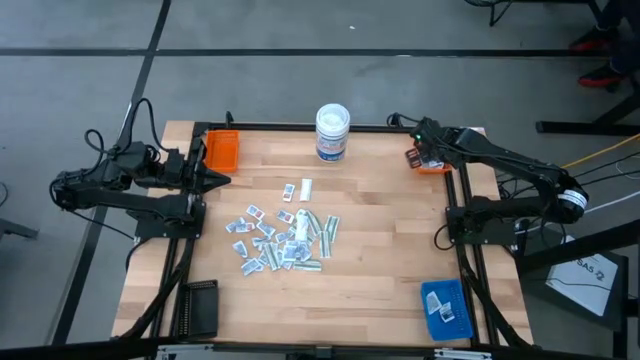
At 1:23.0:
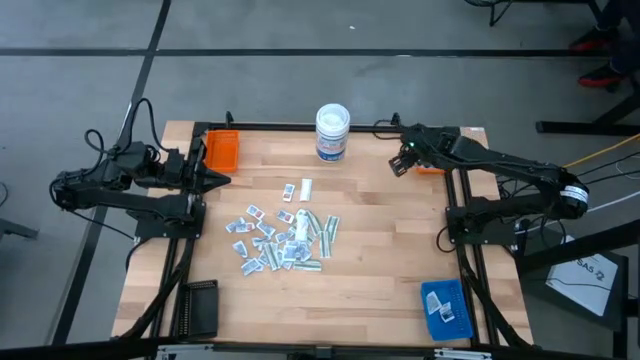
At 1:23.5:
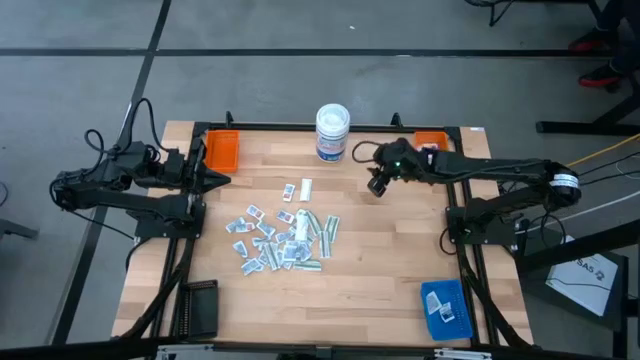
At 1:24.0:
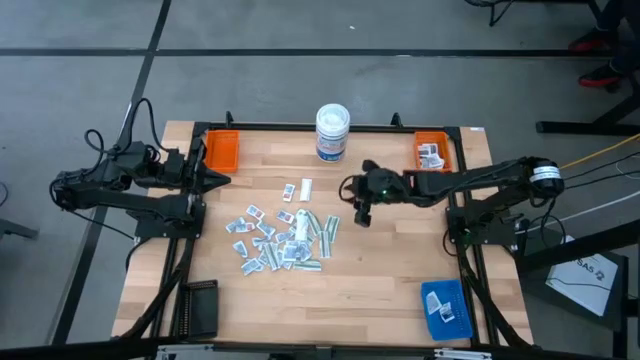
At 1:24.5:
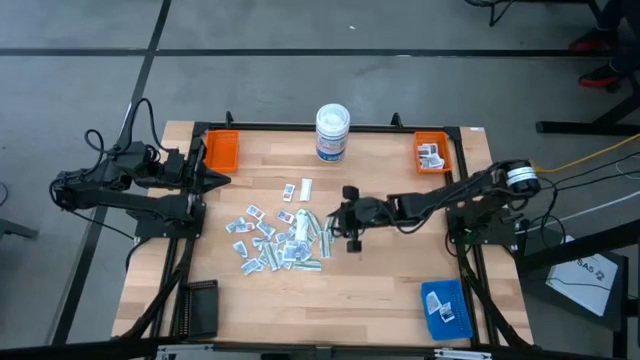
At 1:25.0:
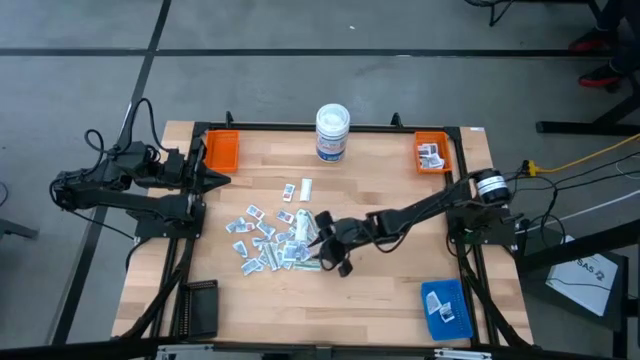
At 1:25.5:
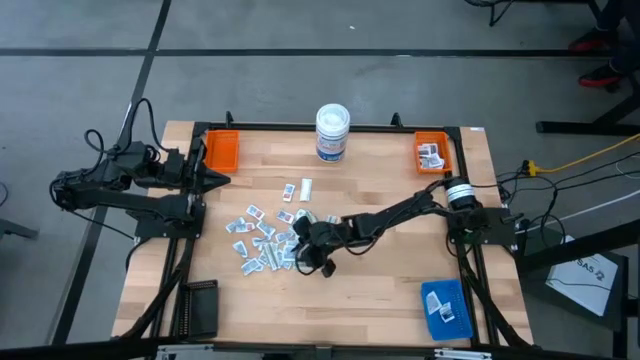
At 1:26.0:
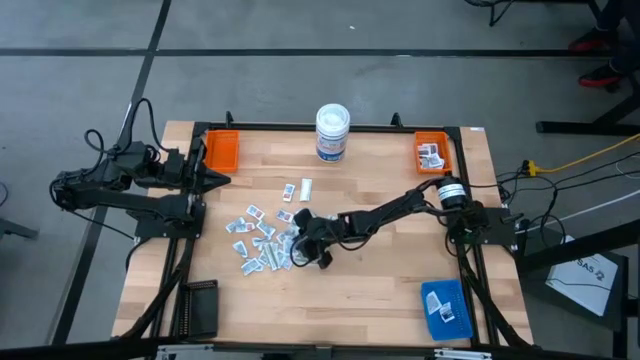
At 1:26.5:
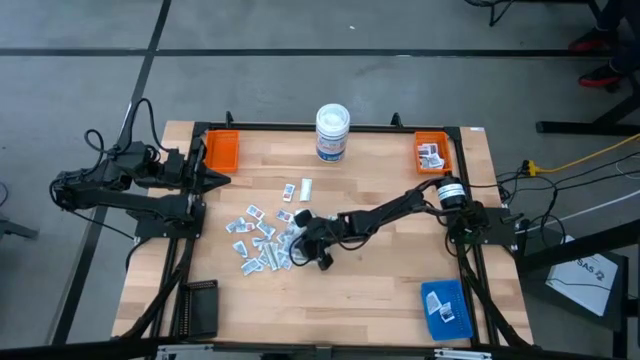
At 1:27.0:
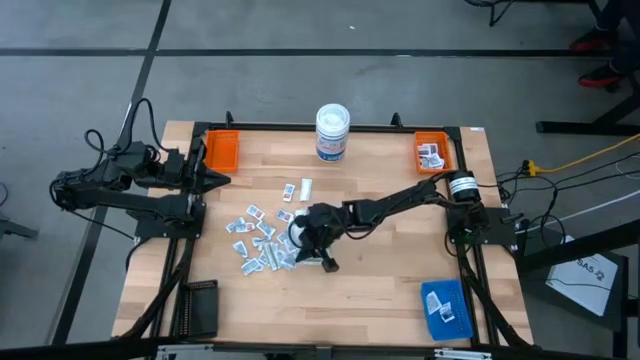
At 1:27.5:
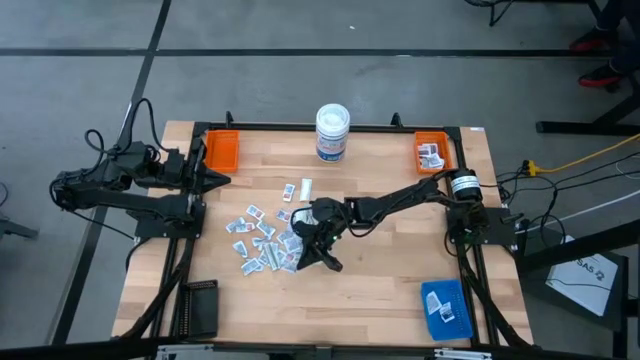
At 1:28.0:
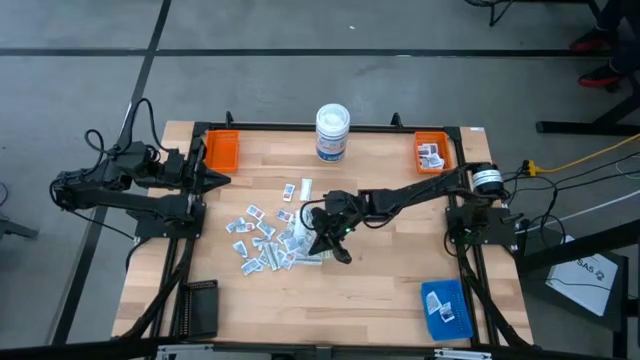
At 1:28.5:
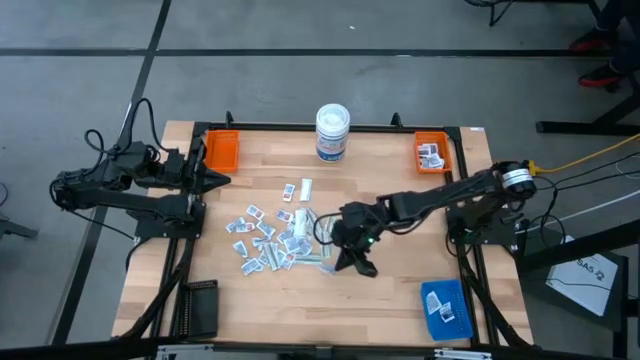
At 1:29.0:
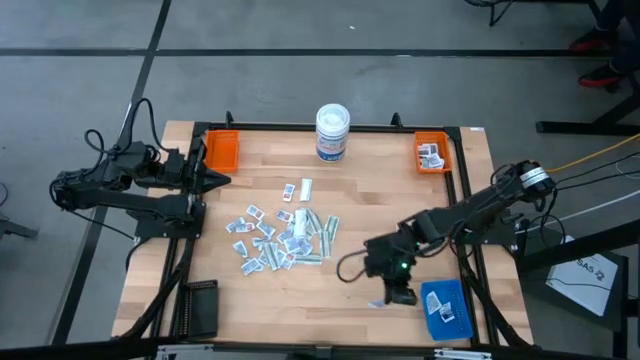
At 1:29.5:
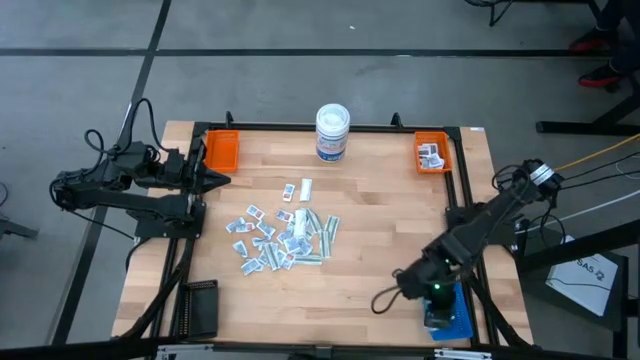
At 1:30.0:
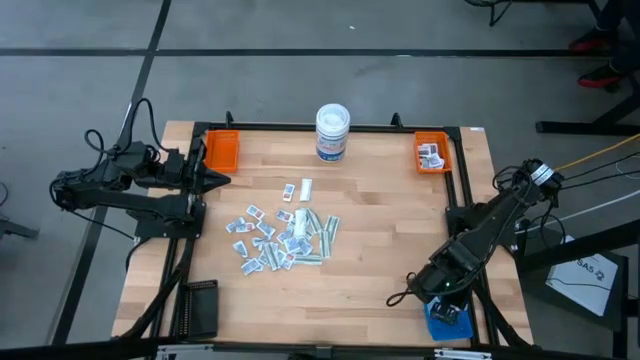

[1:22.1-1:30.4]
Task: Pick & Place First Aid Supplies
Put the blue alcohol pad into the blue bin

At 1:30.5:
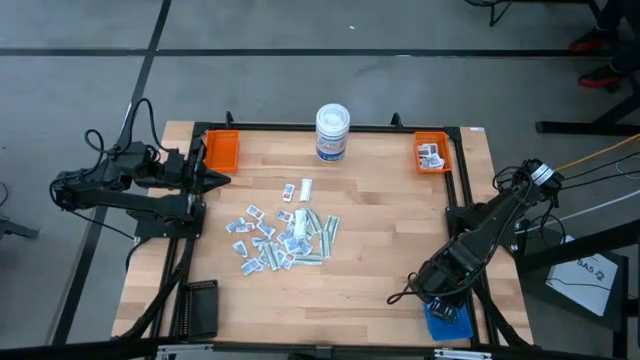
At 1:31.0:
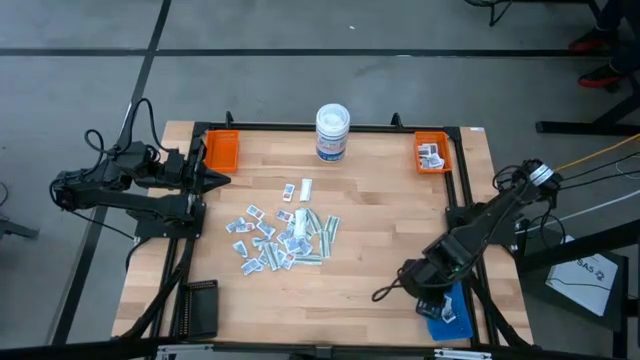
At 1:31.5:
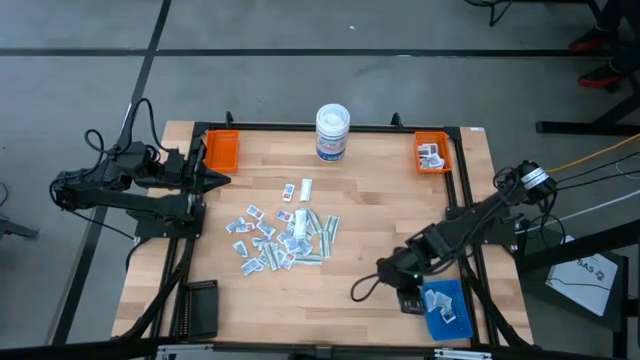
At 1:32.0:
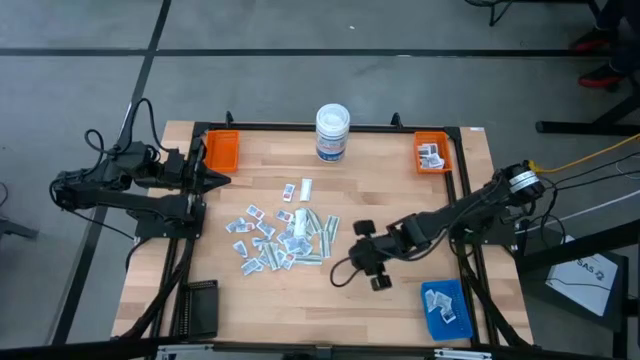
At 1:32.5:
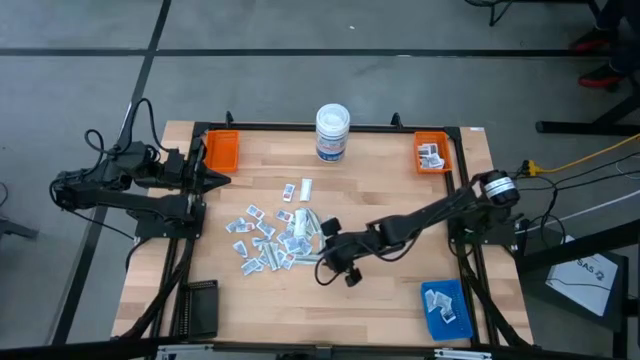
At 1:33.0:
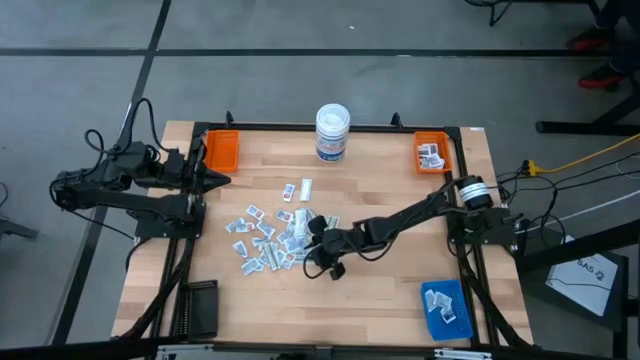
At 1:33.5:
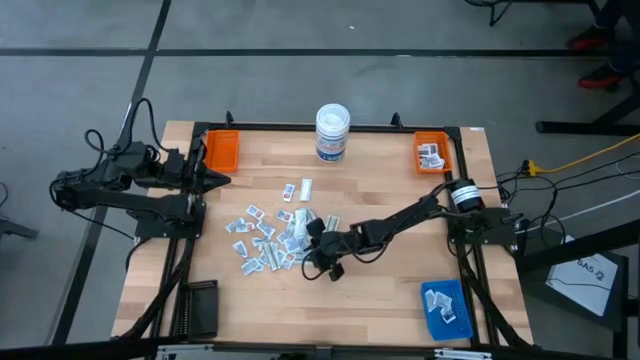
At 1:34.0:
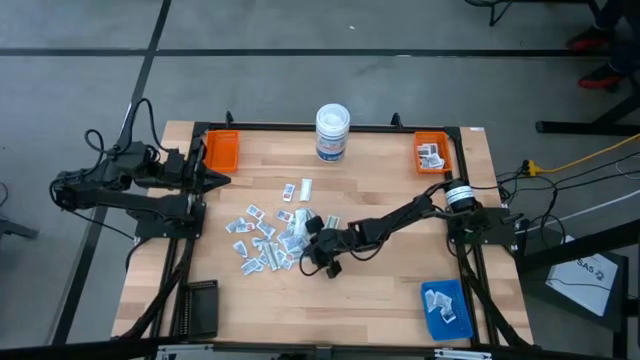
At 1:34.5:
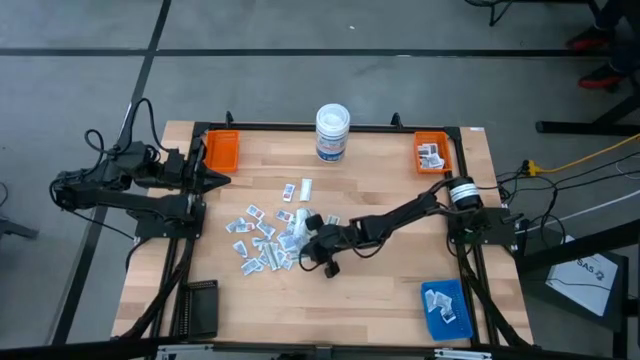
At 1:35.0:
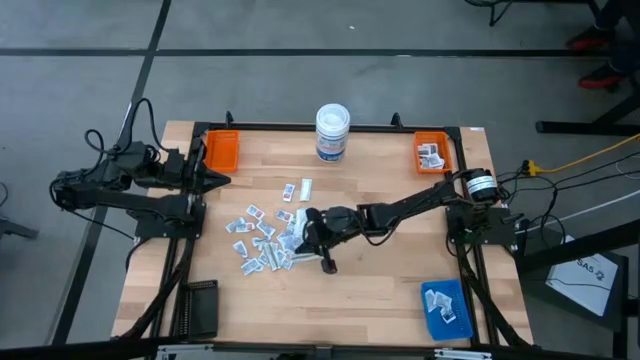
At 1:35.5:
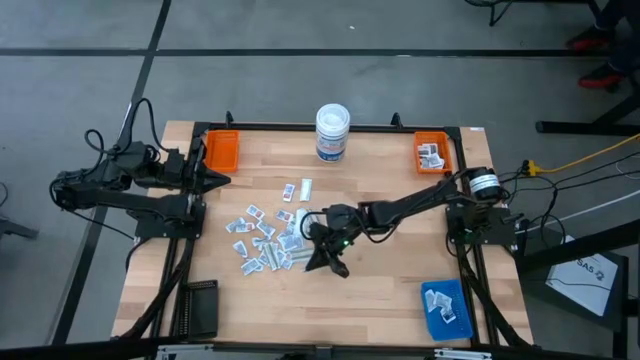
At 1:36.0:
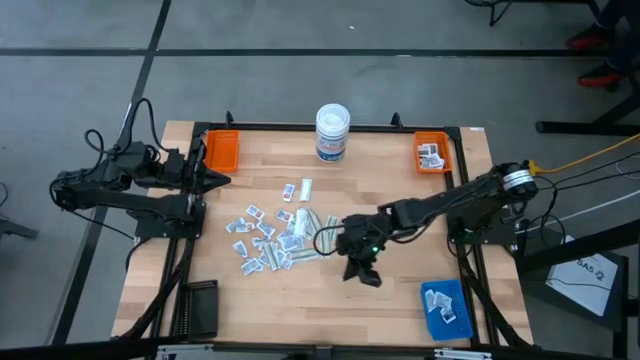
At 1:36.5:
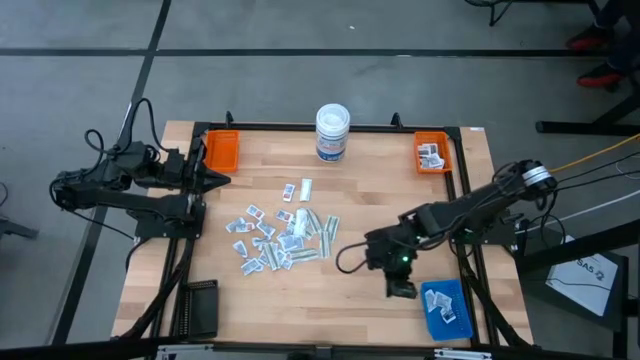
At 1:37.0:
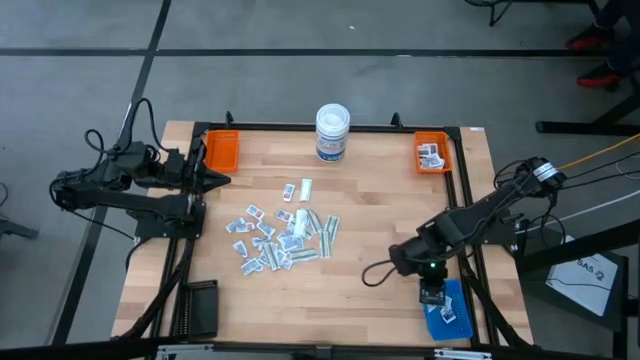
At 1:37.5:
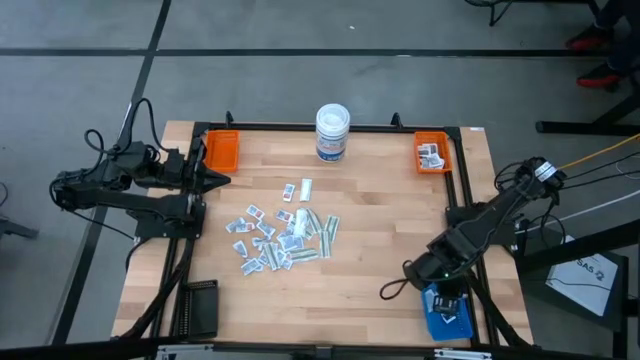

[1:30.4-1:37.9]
Put the blue alcohol pad into the blue bin

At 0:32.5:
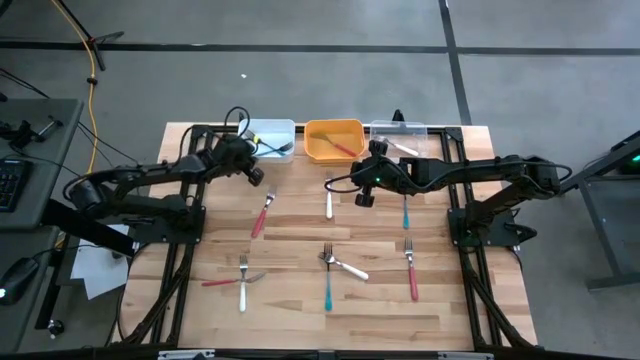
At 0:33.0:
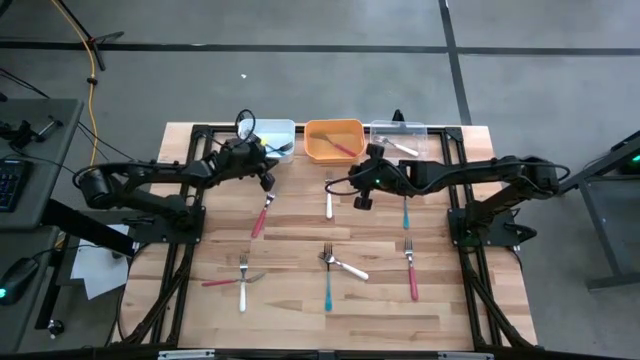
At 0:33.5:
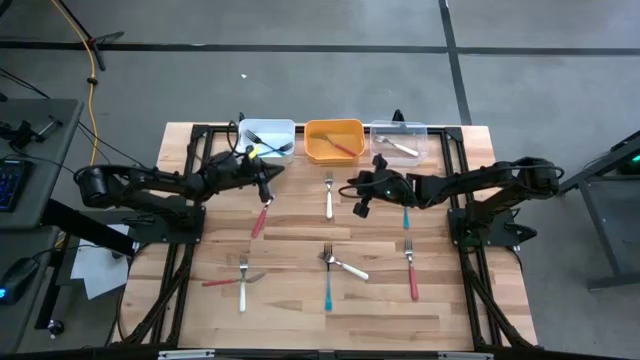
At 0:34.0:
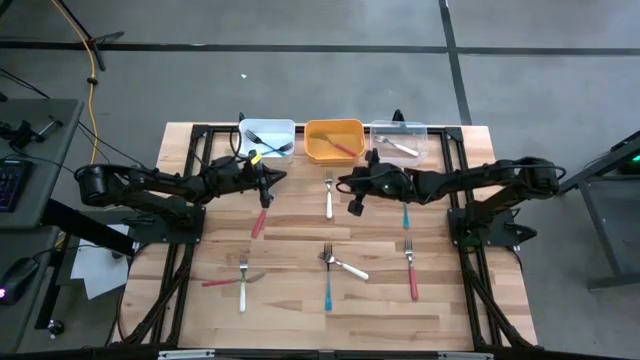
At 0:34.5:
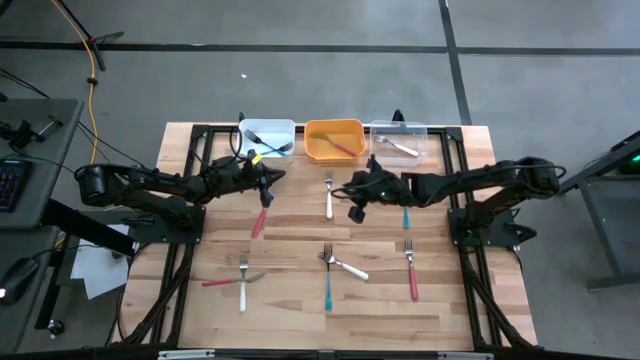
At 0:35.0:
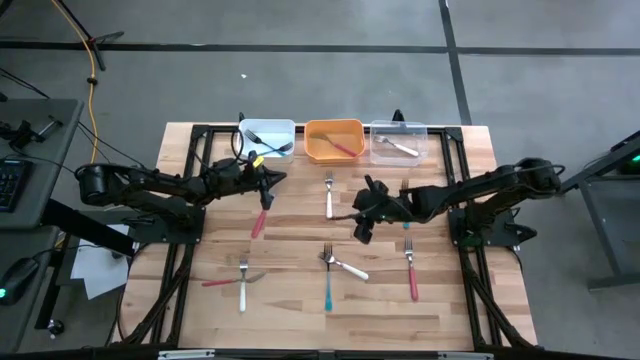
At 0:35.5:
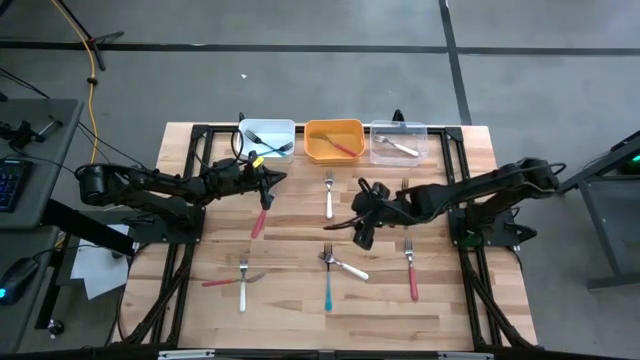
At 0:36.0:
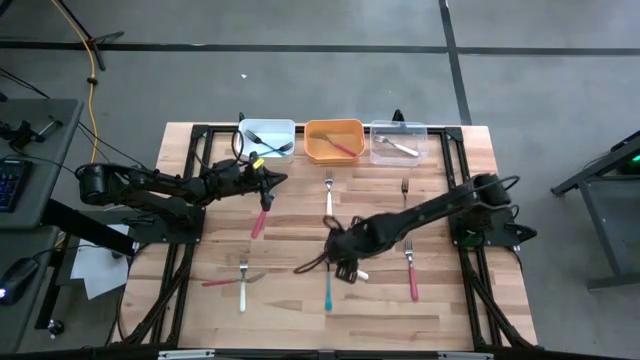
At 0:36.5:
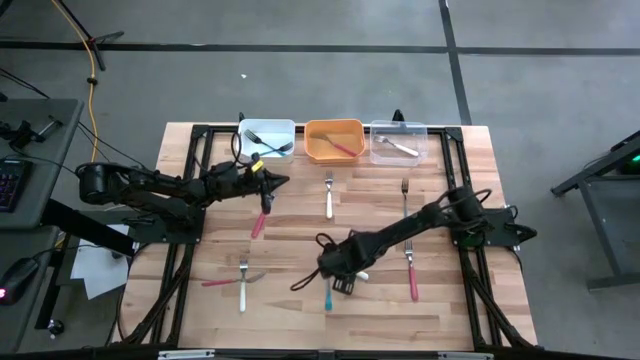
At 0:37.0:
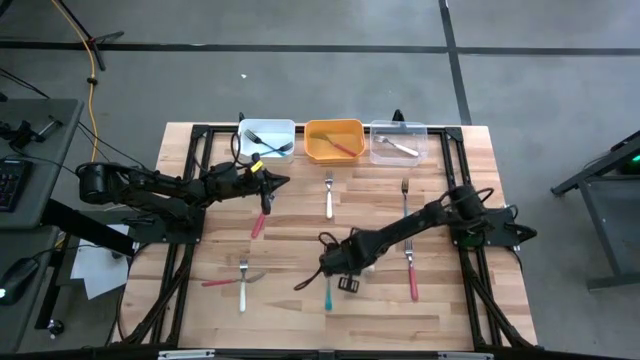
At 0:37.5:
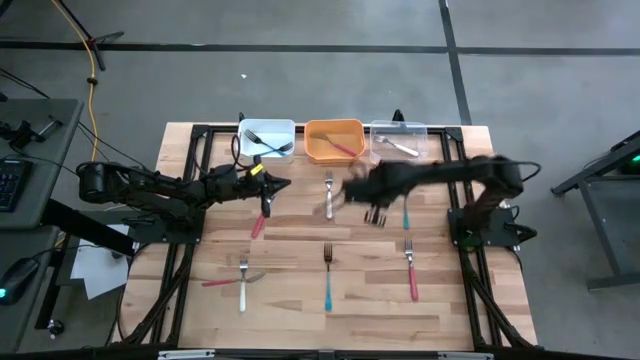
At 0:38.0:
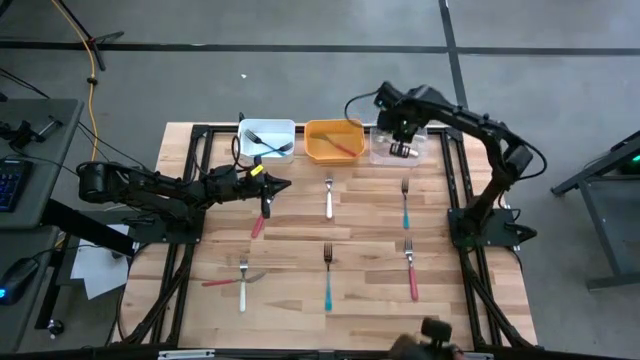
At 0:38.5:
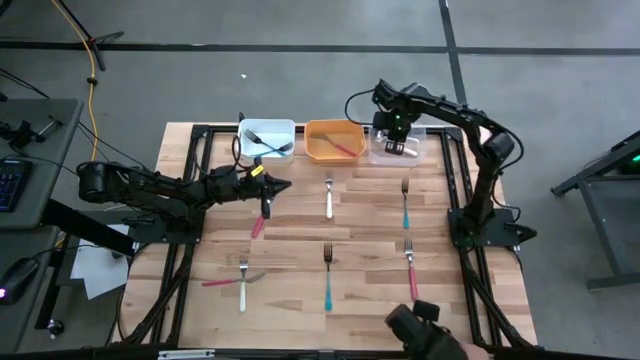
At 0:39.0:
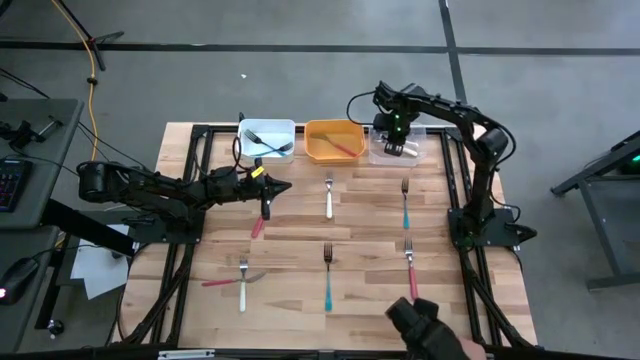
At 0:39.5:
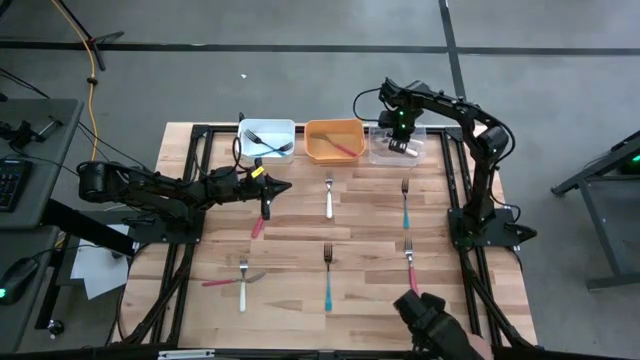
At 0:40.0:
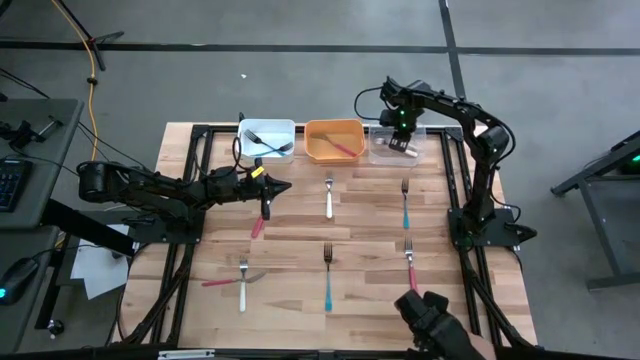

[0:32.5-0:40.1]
Task: Sort silverware by color (type)
Put the bottom right white fork into the transparent bin
